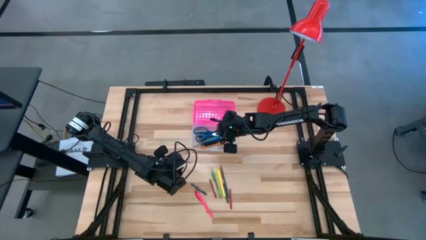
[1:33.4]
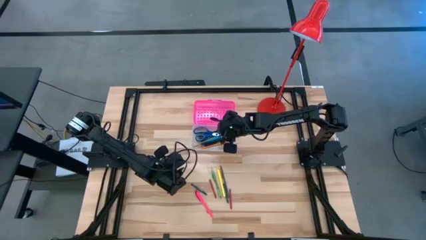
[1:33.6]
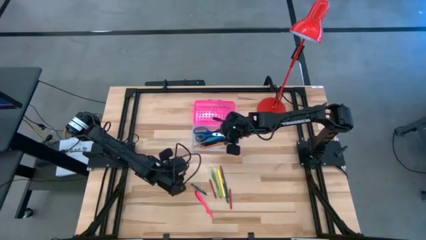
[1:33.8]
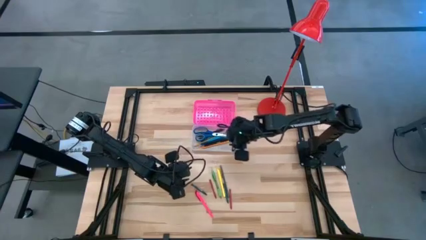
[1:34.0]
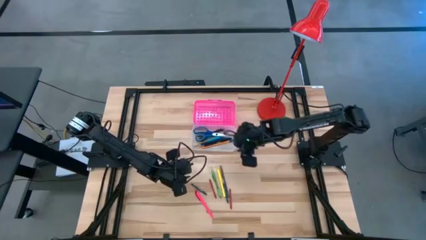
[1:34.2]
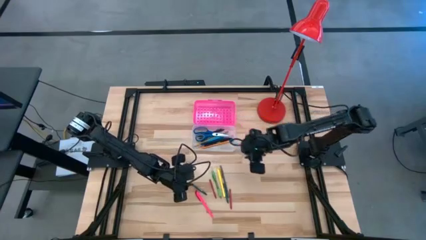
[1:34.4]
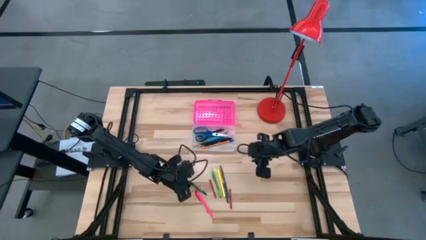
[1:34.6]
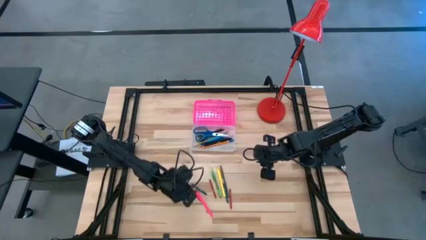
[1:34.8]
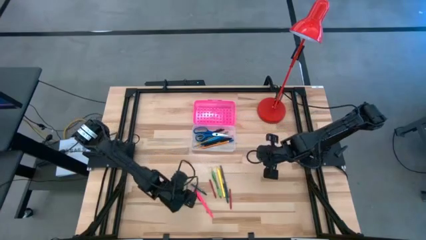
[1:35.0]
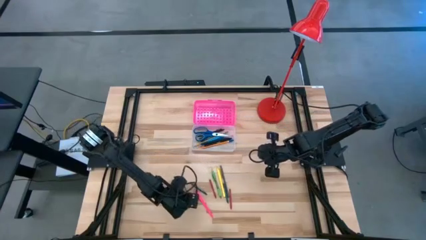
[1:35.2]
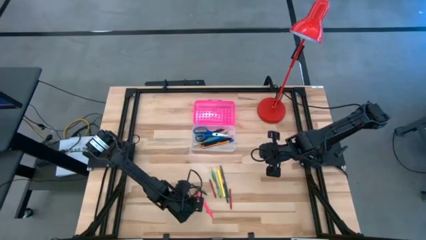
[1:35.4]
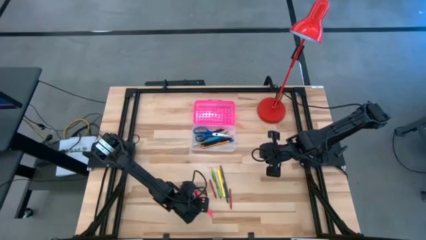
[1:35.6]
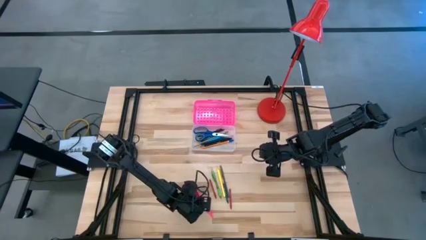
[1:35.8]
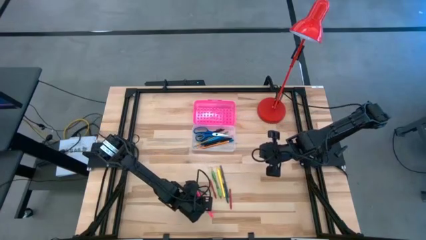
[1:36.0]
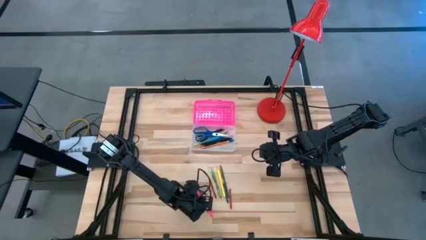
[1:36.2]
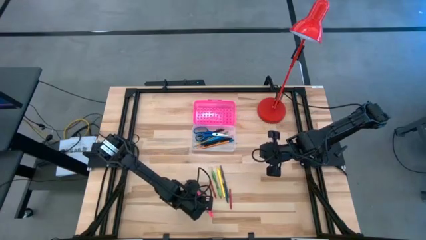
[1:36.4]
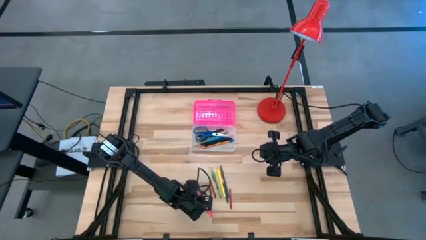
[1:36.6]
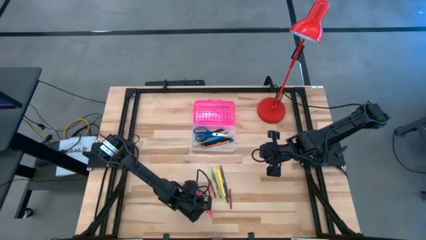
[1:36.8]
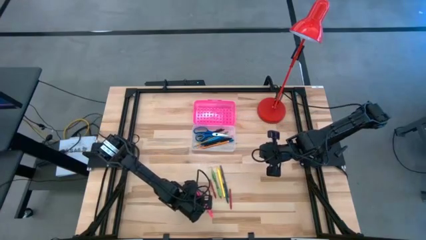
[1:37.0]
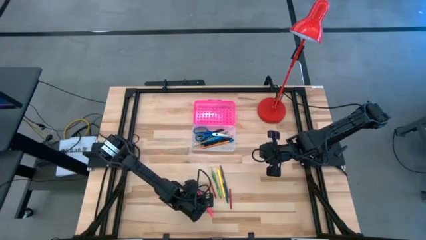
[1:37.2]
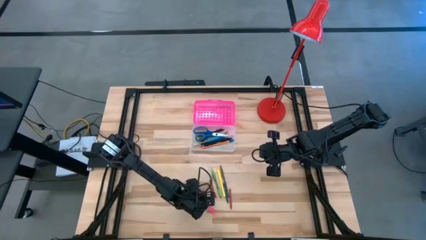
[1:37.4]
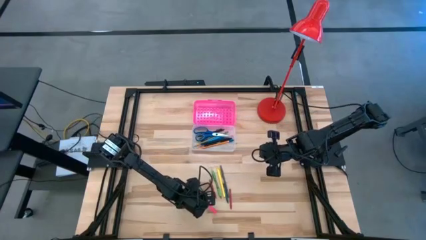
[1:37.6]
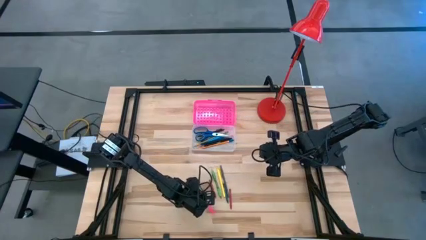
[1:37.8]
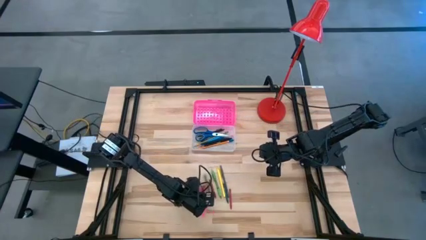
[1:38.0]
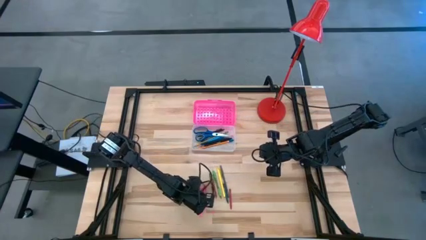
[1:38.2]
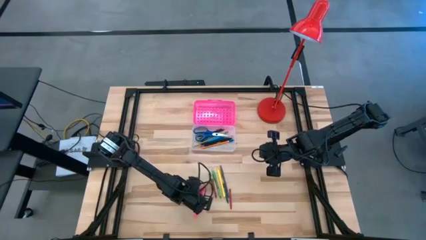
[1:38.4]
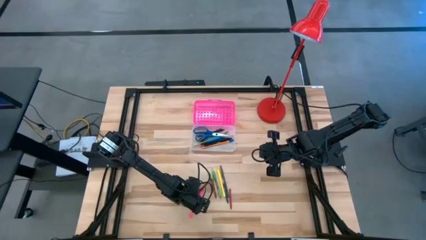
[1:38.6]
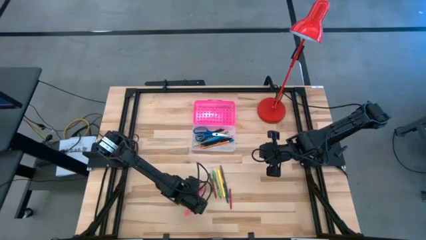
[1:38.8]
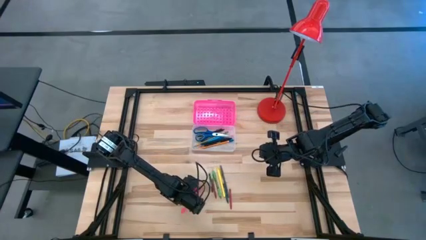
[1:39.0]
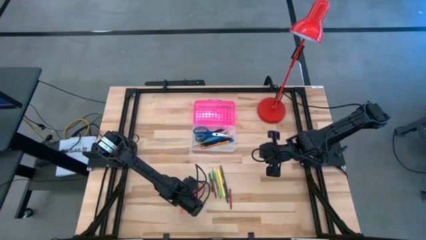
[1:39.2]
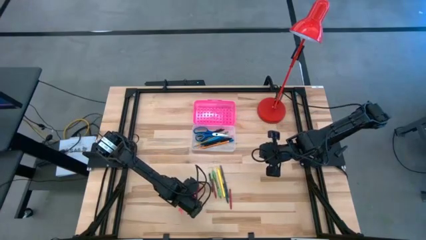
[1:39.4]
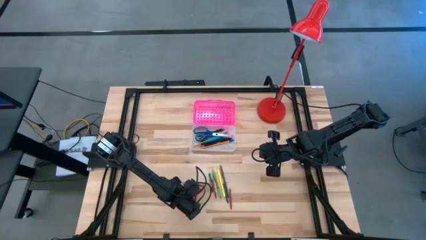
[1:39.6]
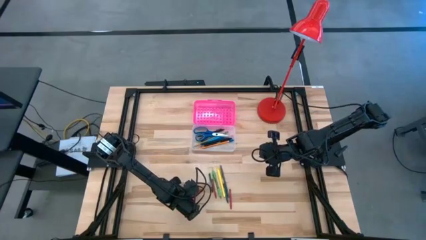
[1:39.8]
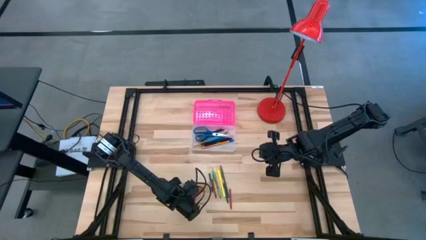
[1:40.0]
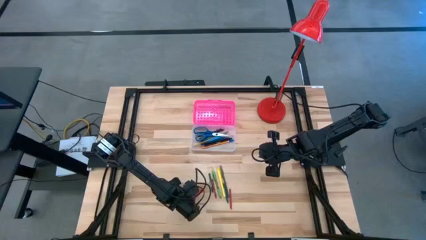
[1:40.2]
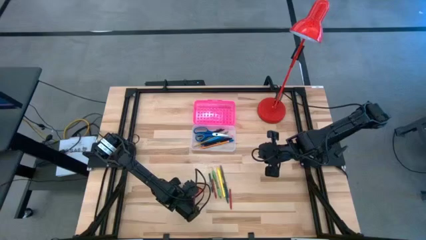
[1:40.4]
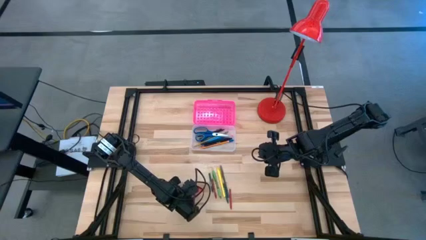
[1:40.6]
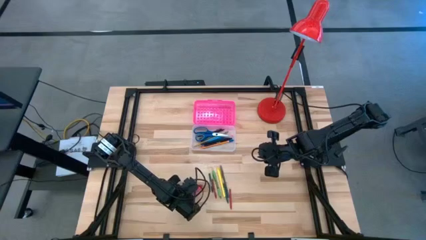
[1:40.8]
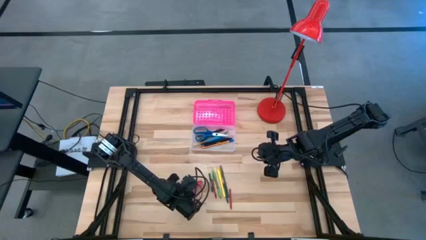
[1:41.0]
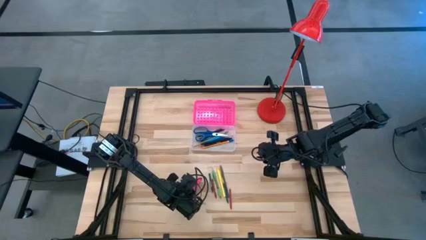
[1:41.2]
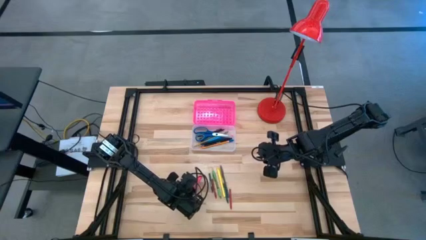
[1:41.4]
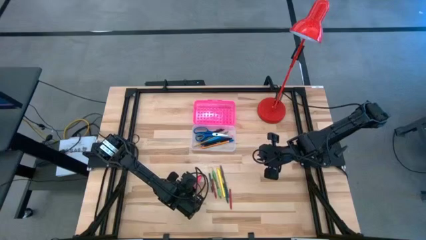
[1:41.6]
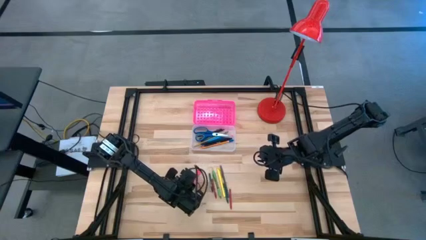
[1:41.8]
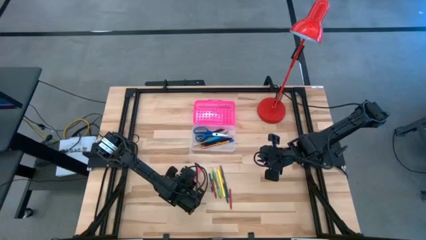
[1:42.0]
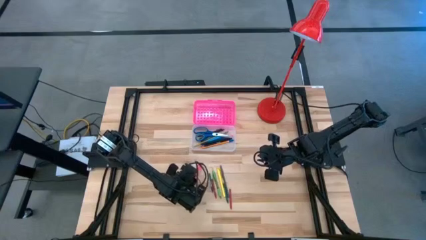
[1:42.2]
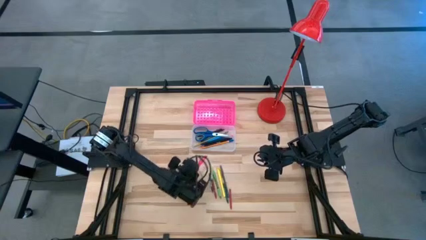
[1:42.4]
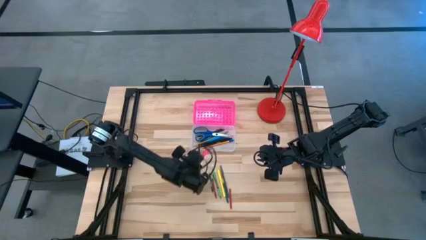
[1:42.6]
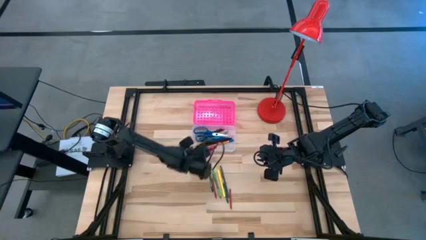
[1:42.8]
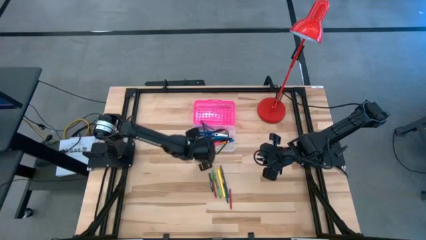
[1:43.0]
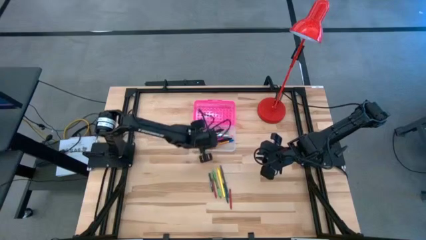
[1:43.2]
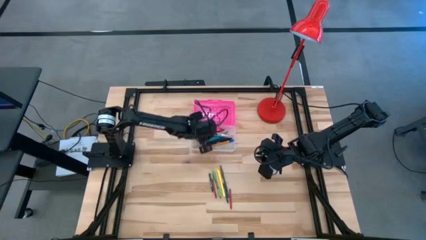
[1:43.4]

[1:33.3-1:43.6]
Task: Pick & place school supplies into a supply box
Put the pink pen into the pink supply box

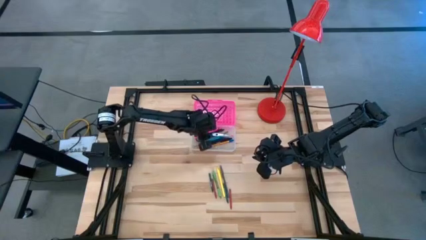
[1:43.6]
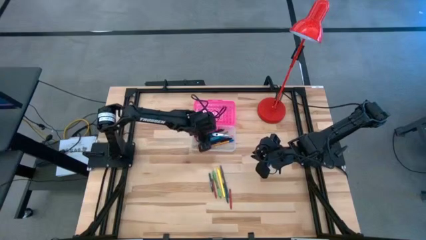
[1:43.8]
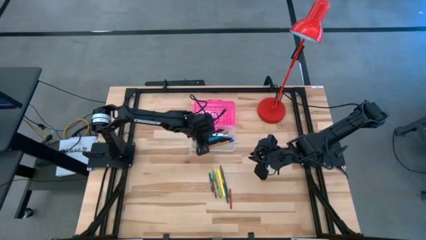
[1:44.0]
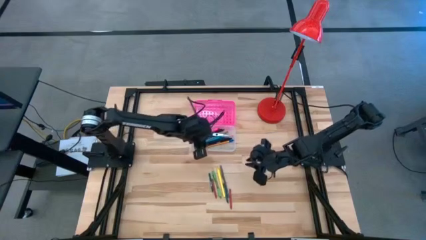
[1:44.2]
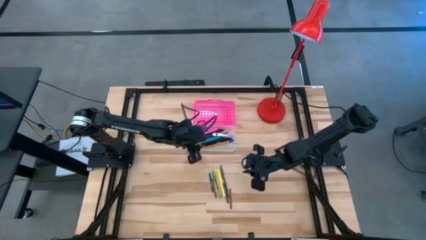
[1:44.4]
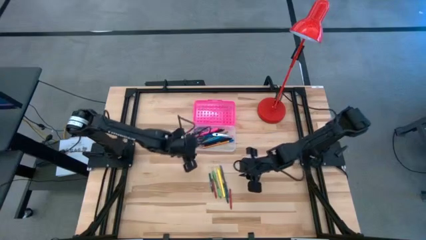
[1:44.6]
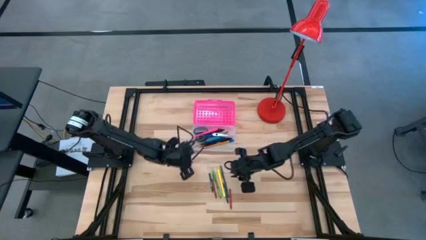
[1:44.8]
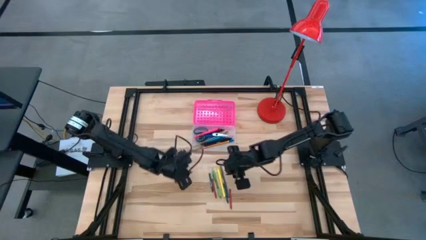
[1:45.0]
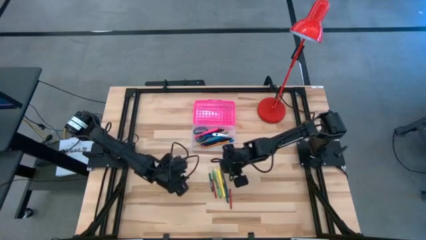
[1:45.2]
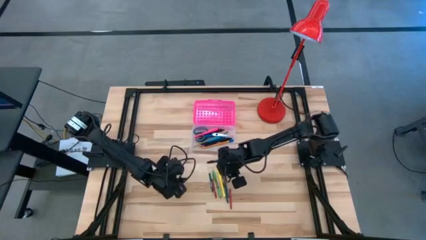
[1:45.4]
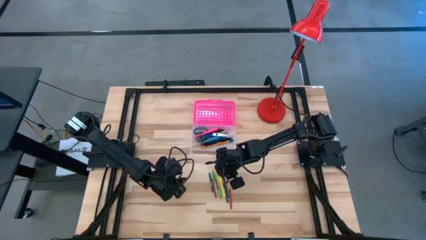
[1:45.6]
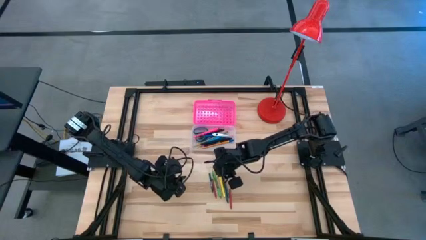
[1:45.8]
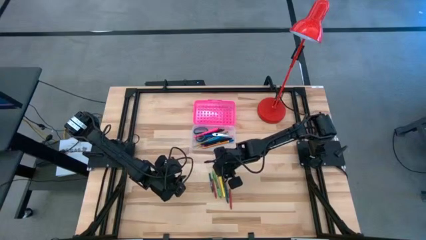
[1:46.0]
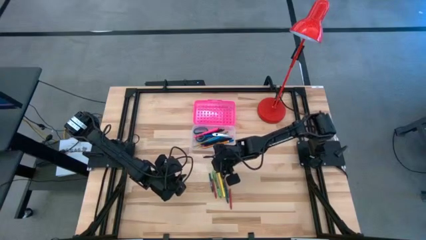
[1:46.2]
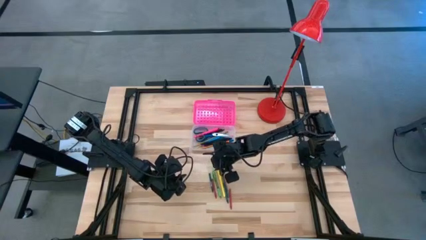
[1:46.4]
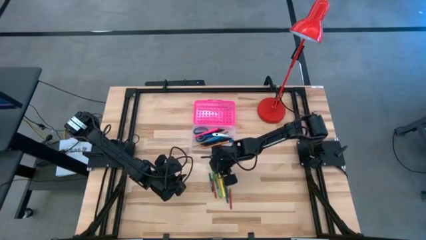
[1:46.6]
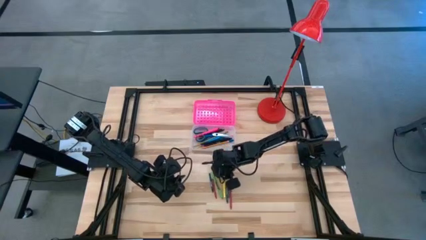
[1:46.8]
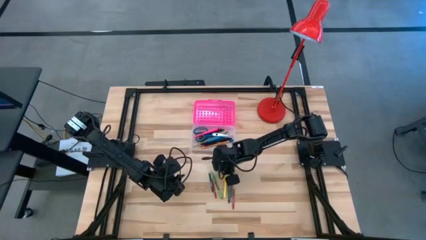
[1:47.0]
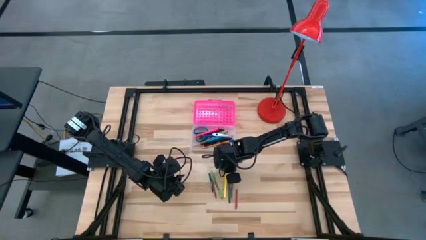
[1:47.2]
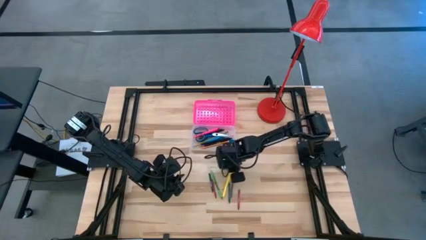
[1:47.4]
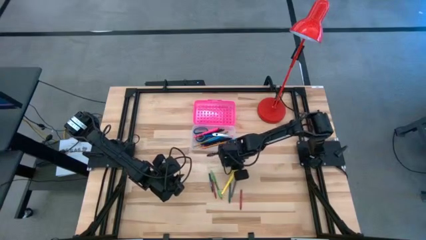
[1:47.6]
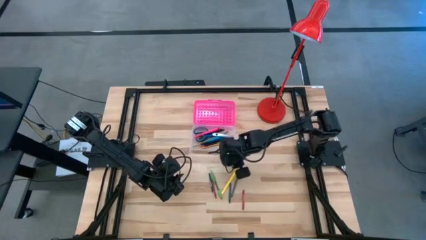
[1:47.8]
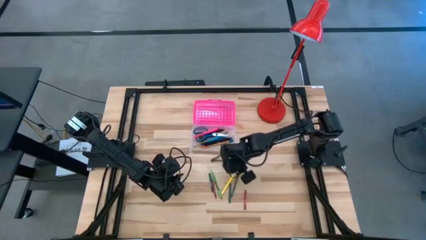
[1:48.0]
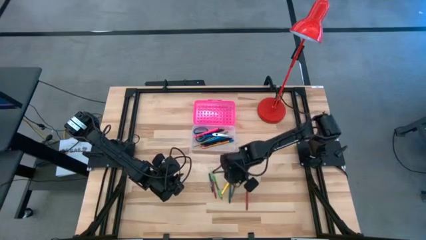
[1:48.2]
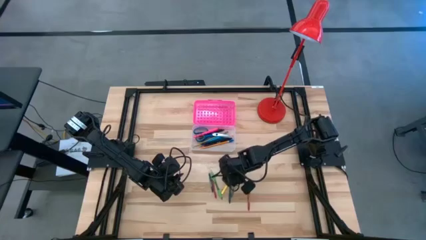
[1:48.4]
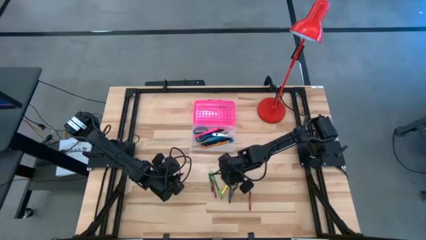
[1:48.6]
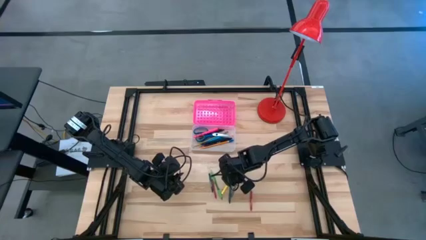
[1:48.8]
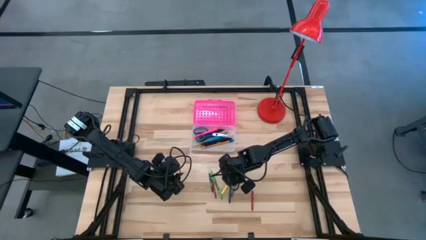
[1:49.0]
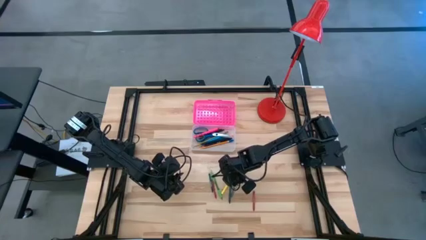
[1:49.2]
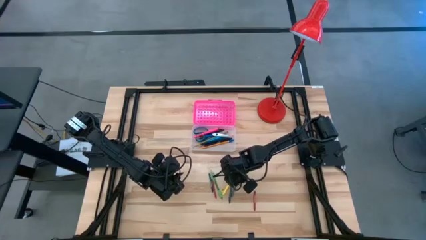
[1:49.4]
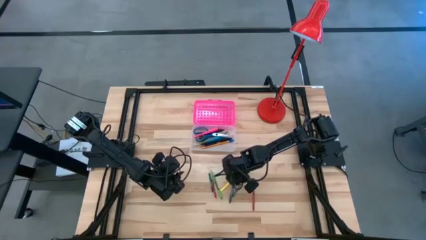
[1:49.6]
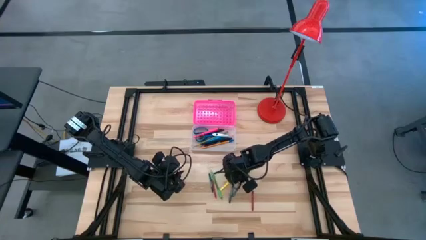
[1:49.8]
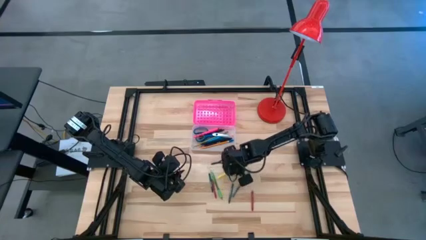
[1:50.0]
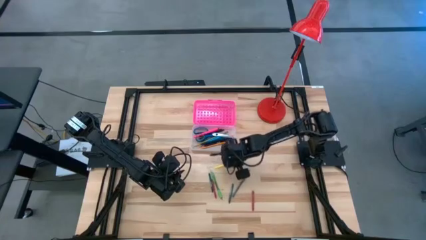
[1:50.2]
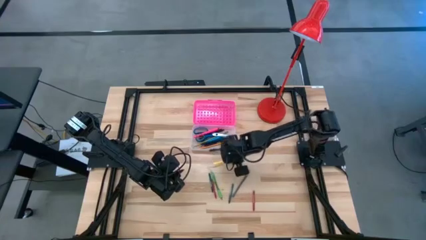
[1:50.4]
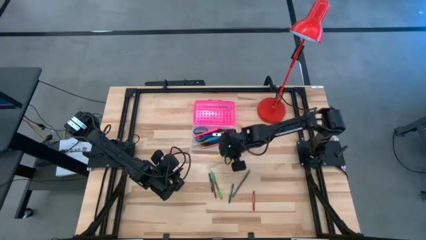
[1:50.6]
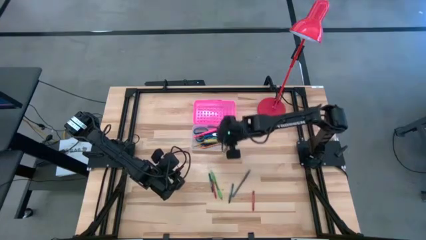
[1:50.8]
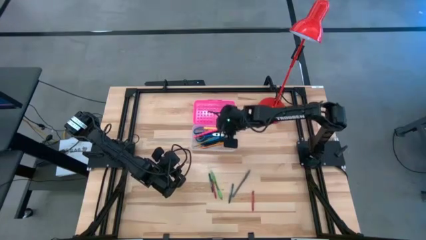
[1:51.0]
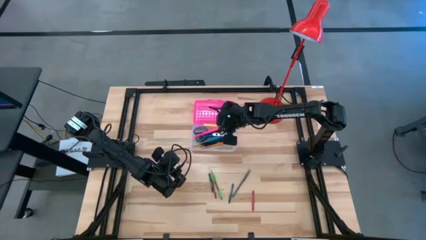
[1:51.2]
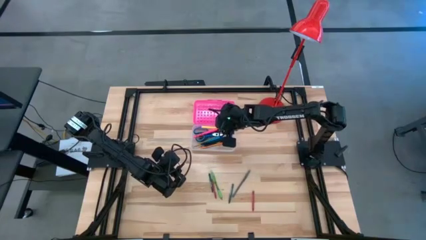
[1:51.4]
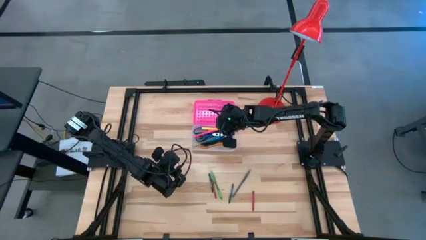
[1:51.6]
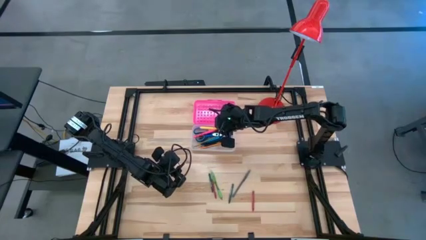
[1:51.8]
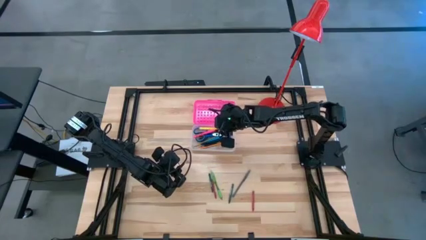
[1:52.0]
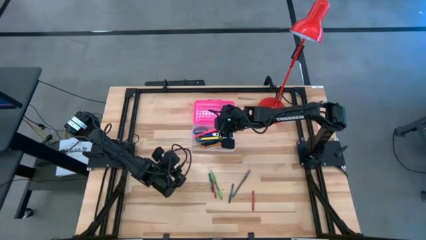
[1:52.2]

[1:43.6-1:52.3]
Put the yellow pen into the pink supply box
